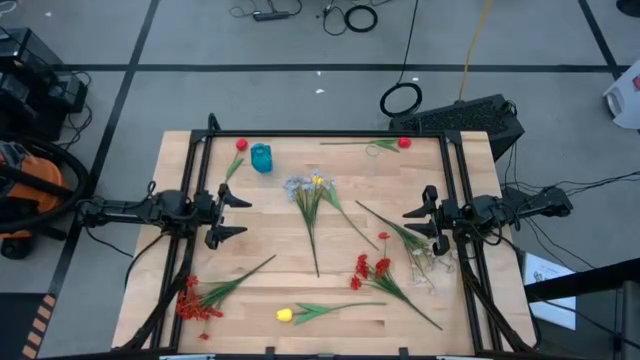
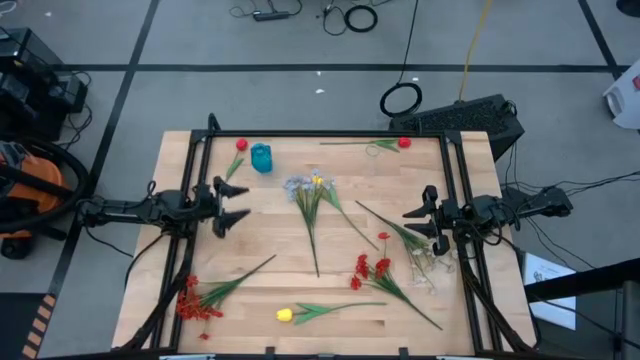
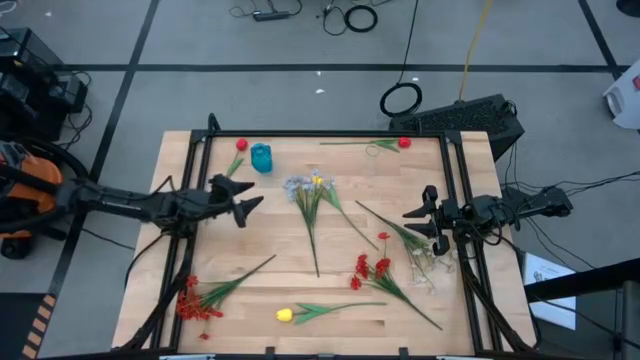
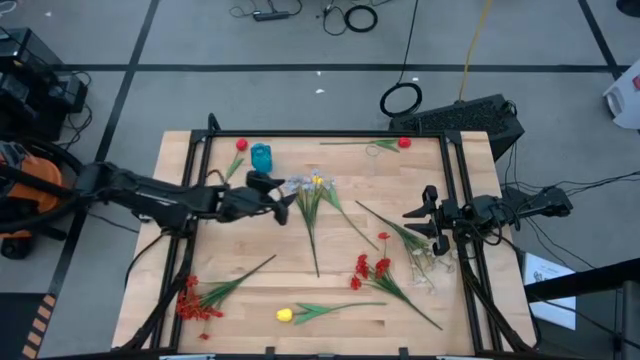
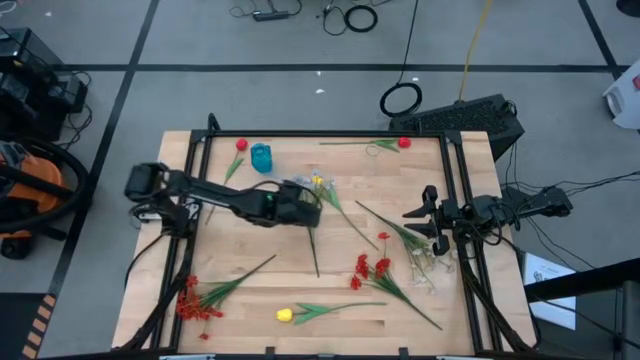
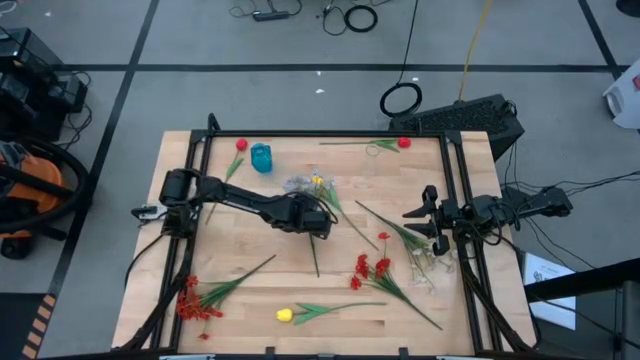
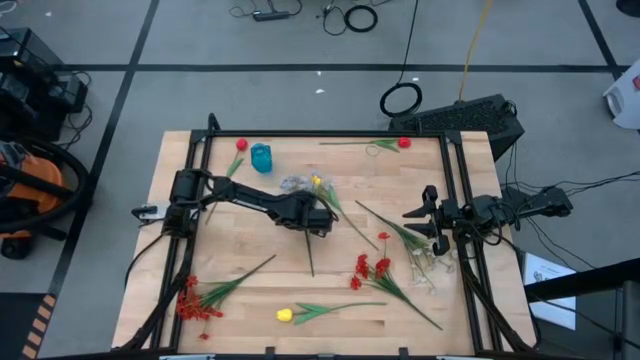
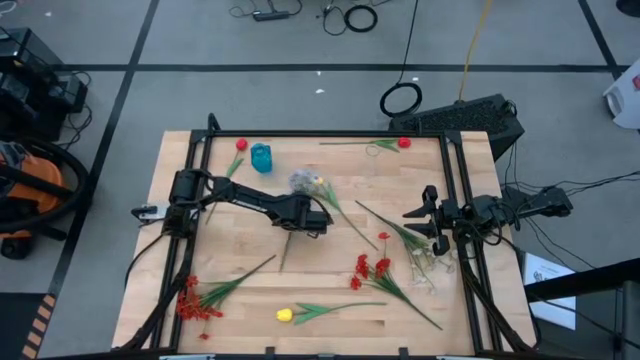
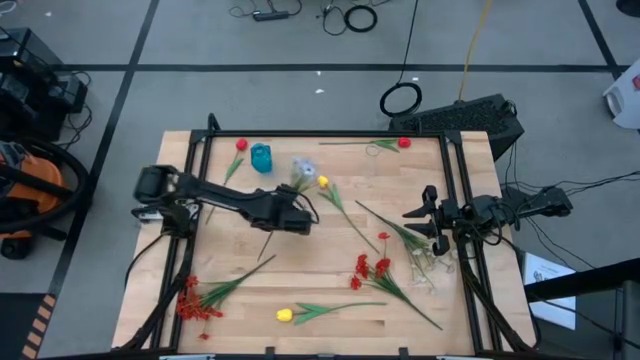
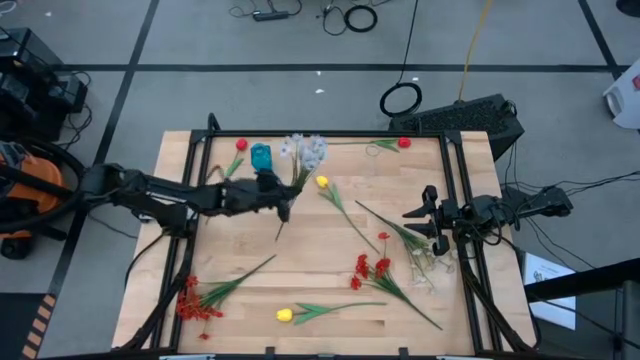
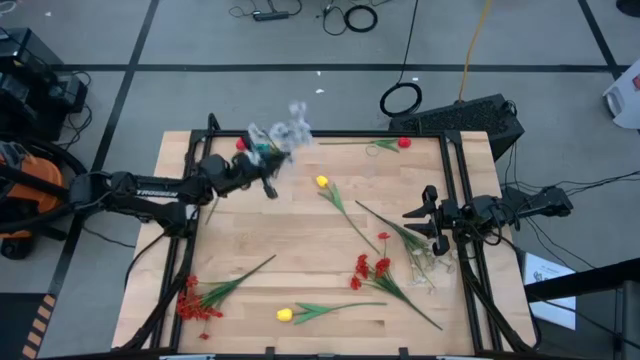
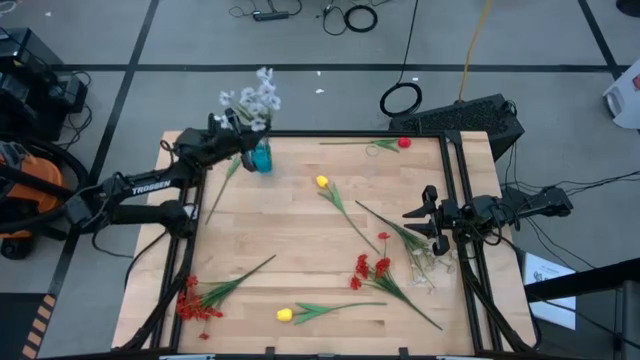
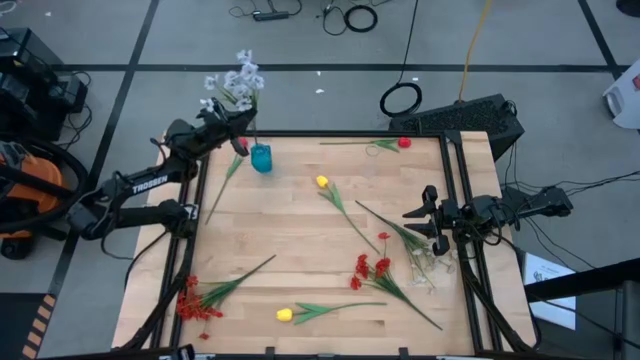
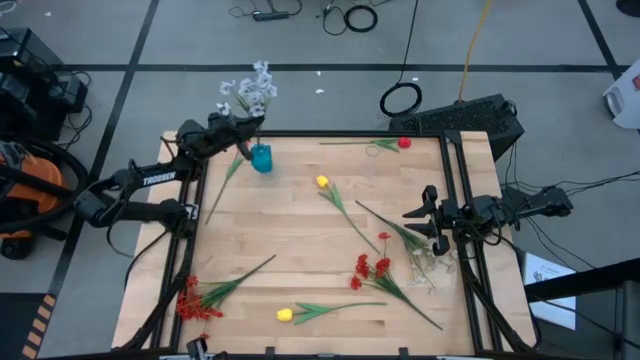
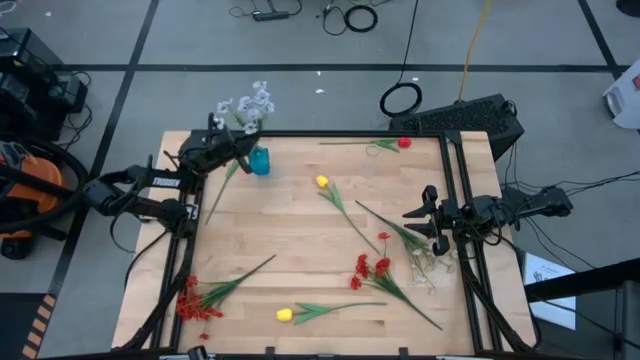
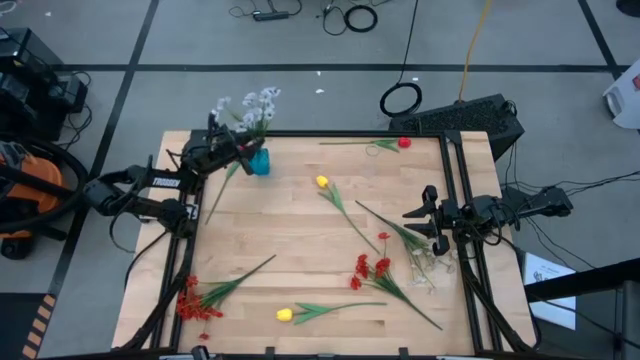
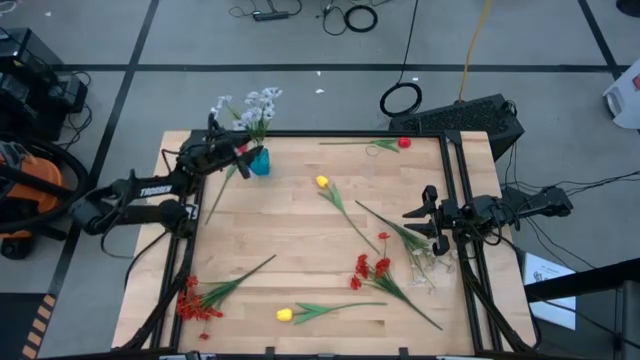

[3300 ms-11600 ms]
Task: Sort flowers into vase by color
Put the top white flowers into the blue vase

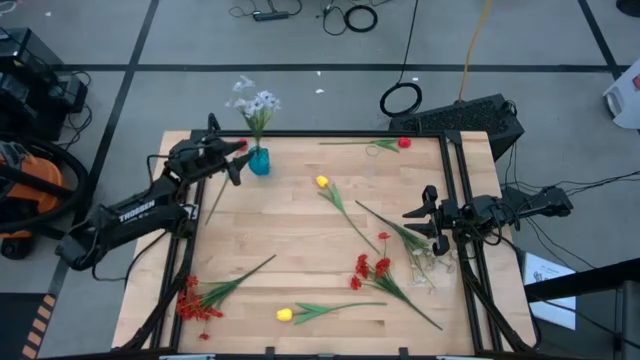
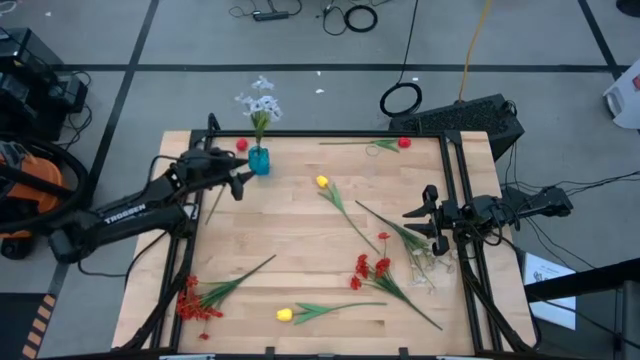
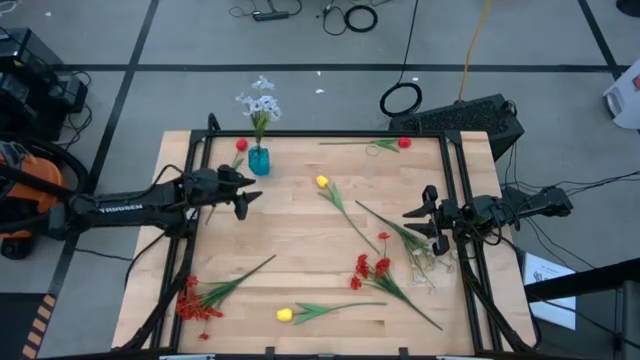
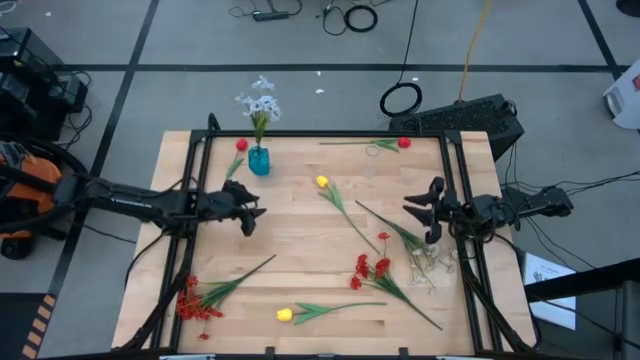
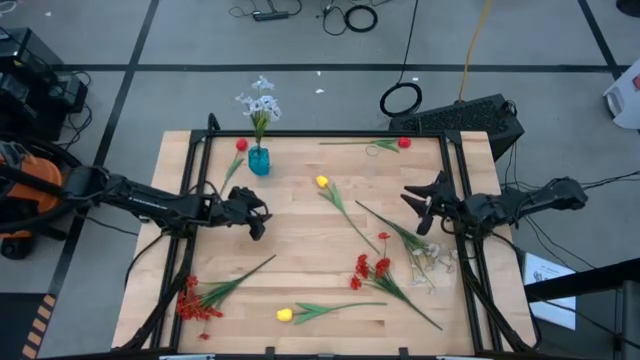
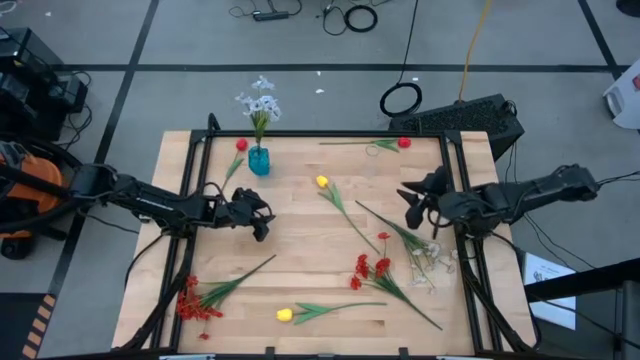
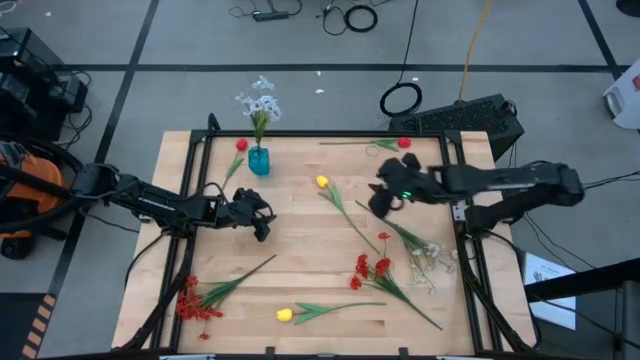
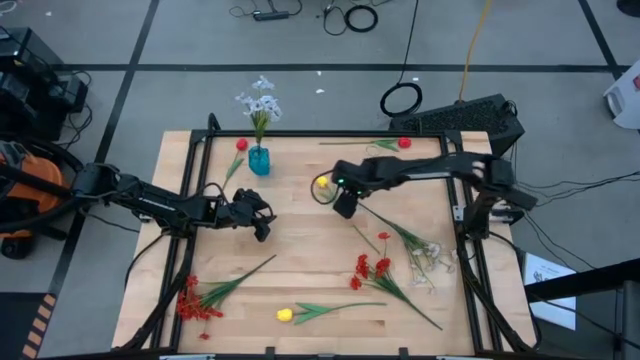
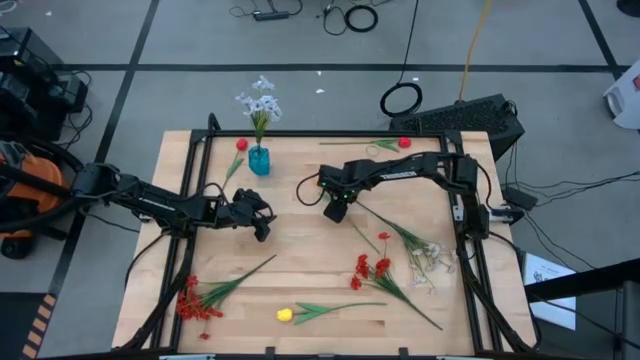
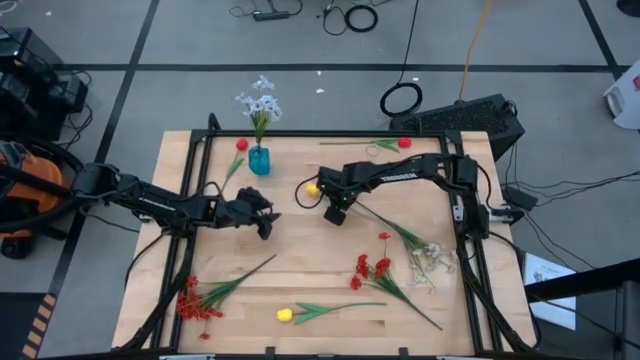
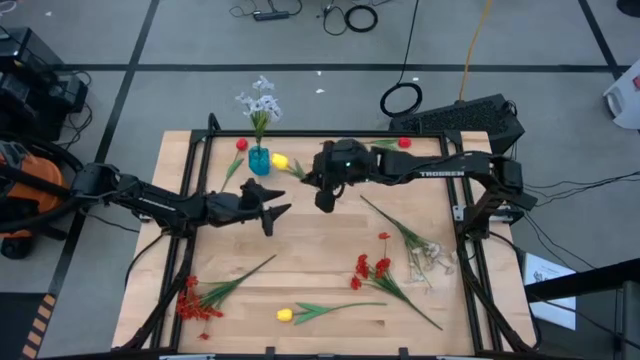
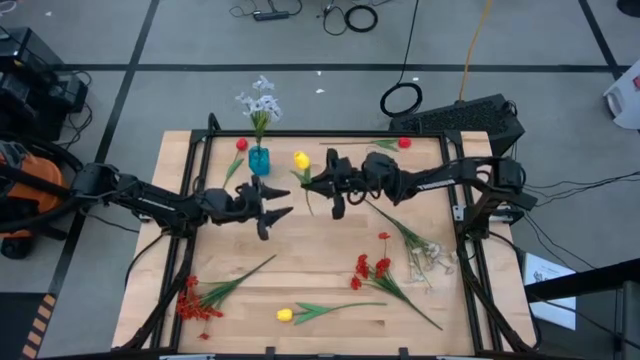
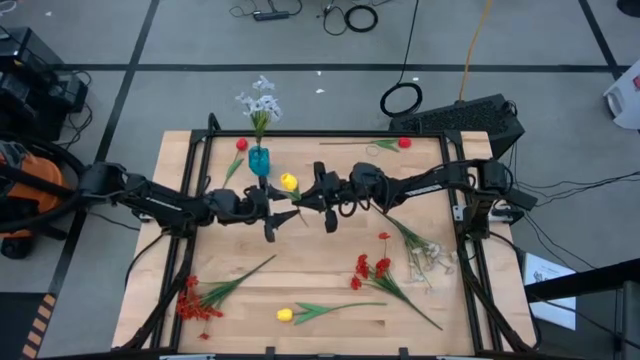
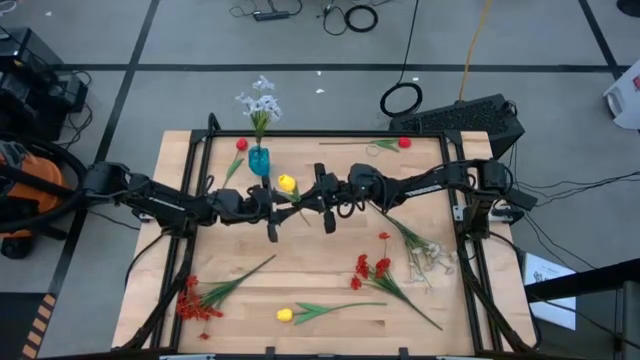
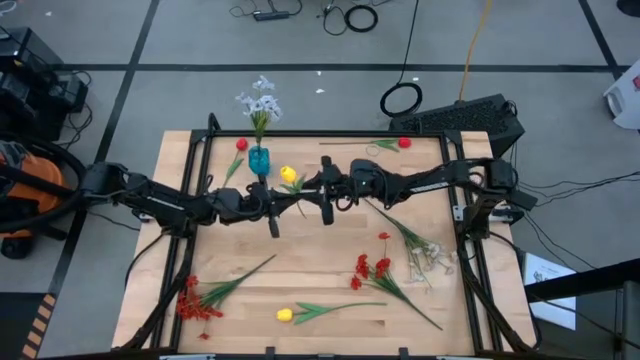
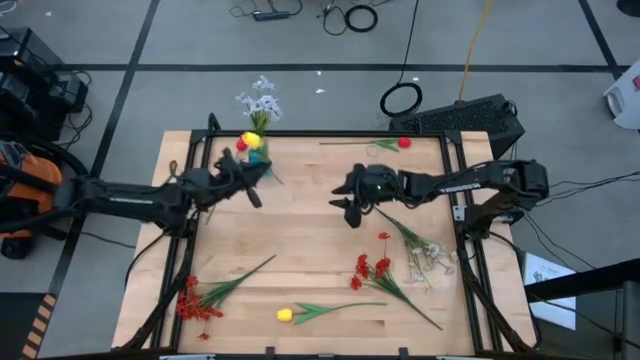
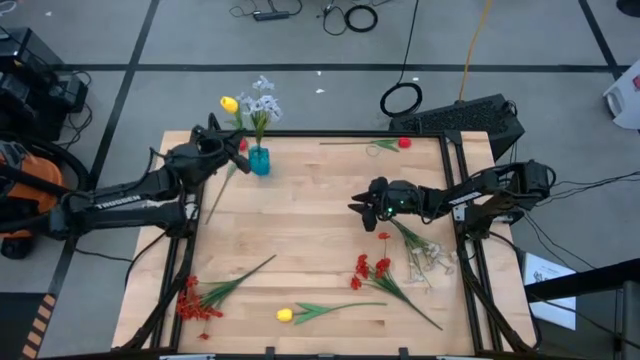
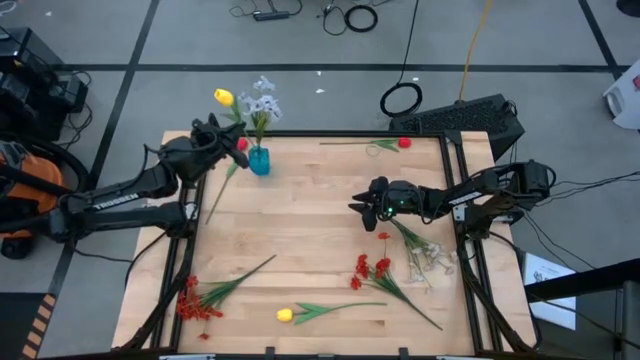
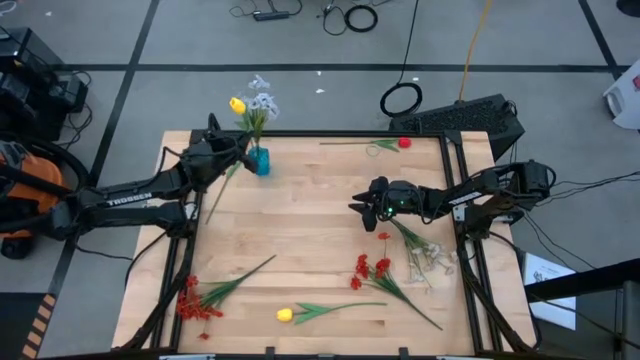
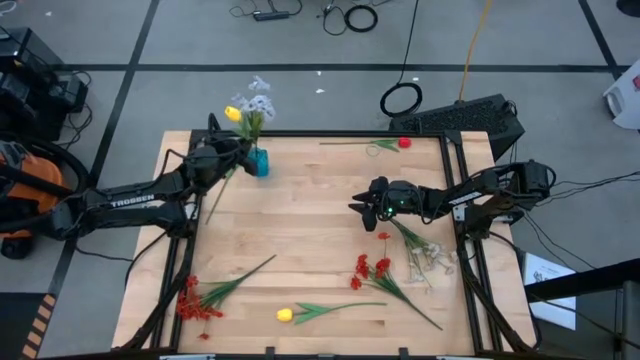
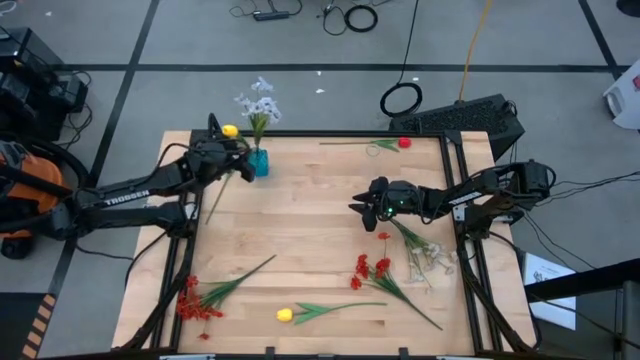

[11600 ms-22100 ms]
Put the top yellow flower into the blue vase
